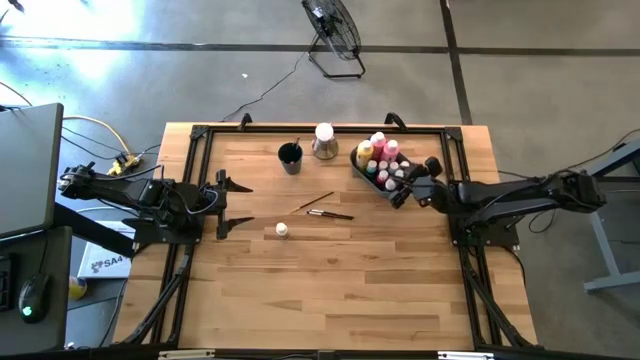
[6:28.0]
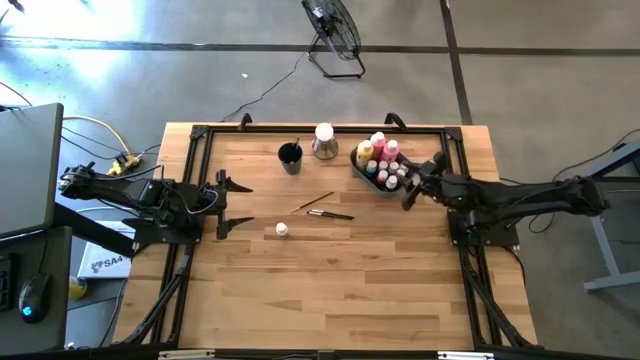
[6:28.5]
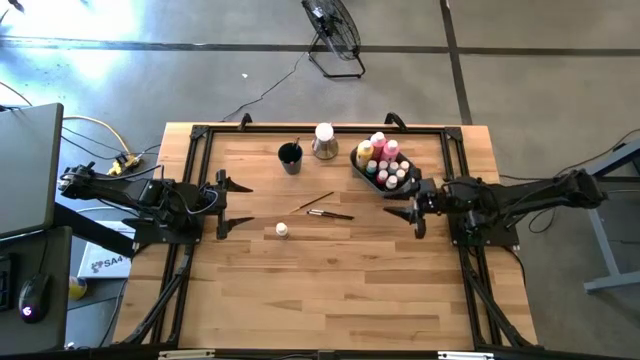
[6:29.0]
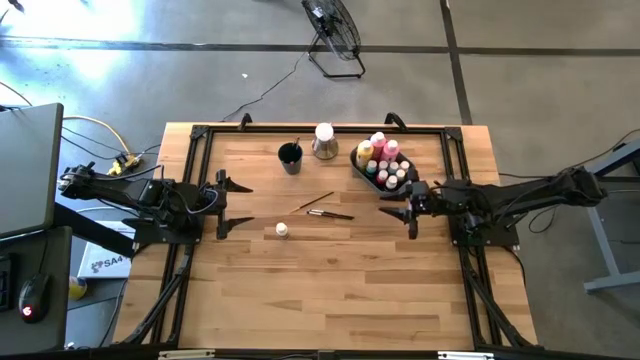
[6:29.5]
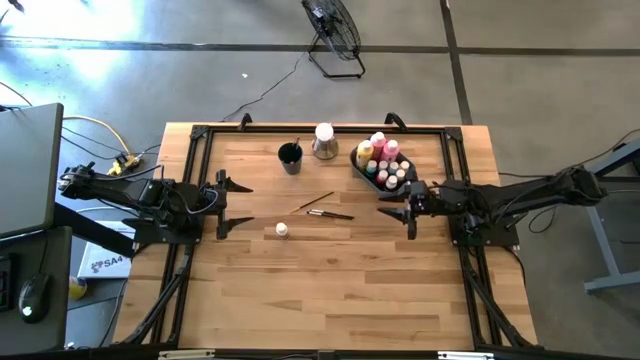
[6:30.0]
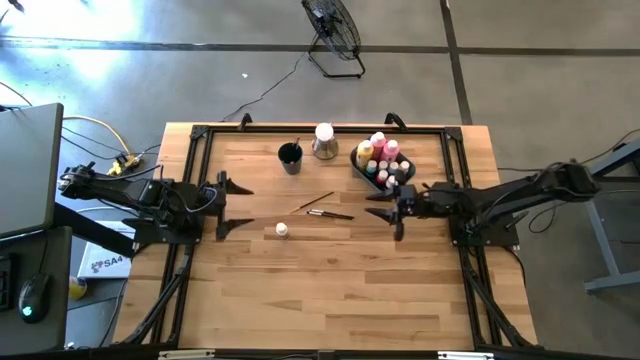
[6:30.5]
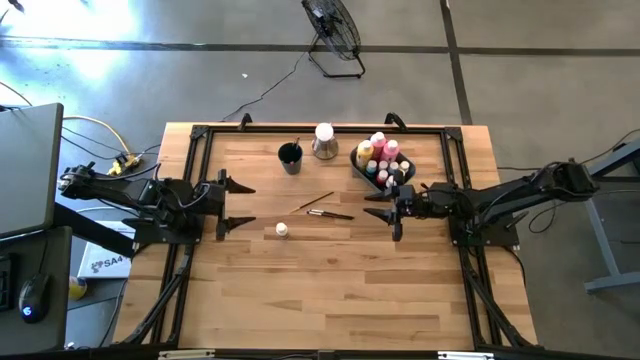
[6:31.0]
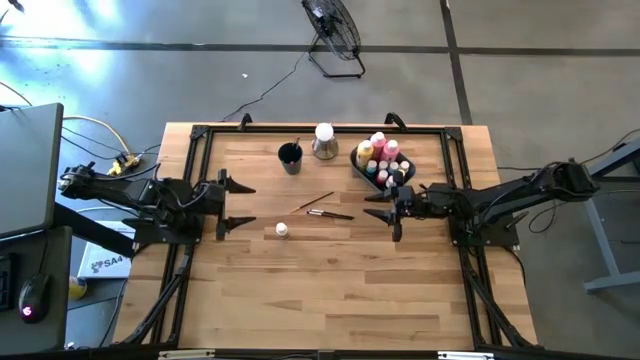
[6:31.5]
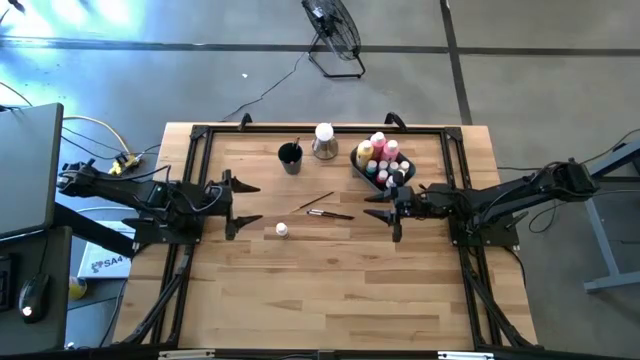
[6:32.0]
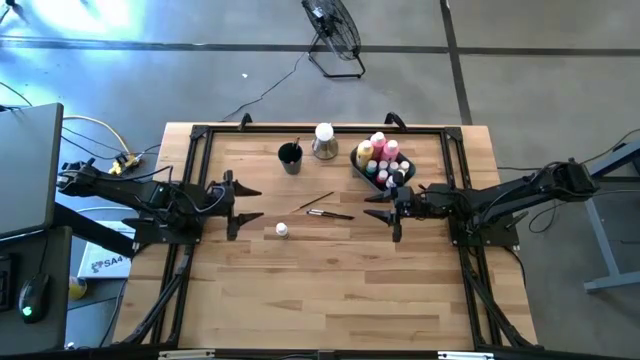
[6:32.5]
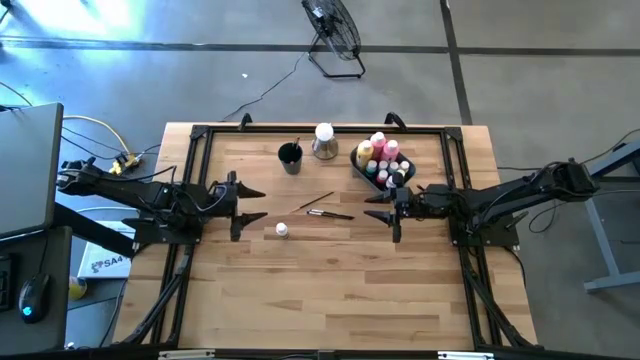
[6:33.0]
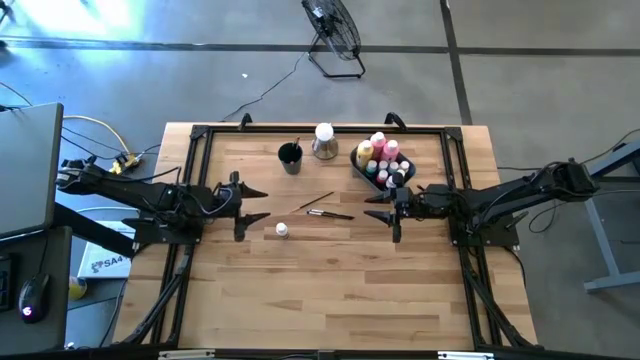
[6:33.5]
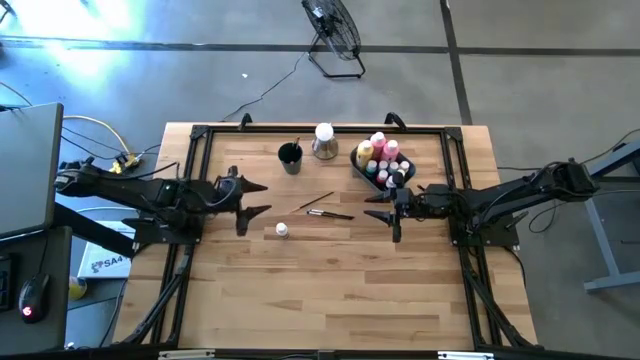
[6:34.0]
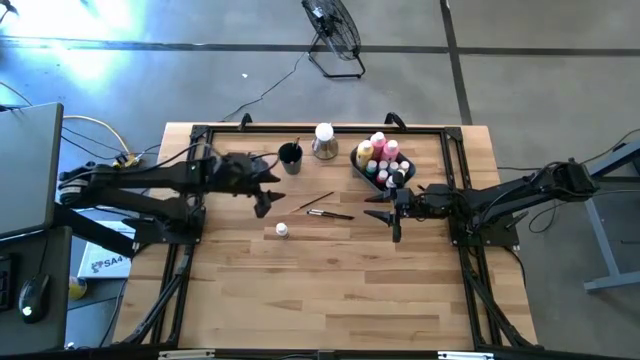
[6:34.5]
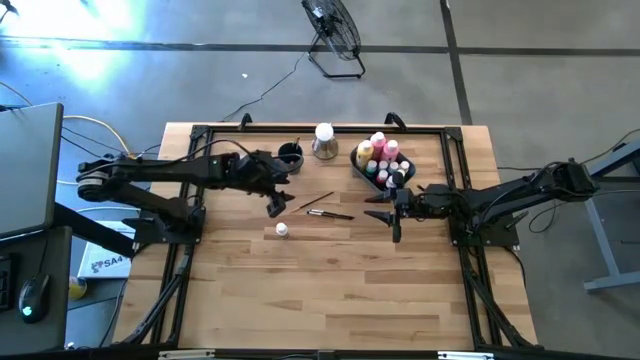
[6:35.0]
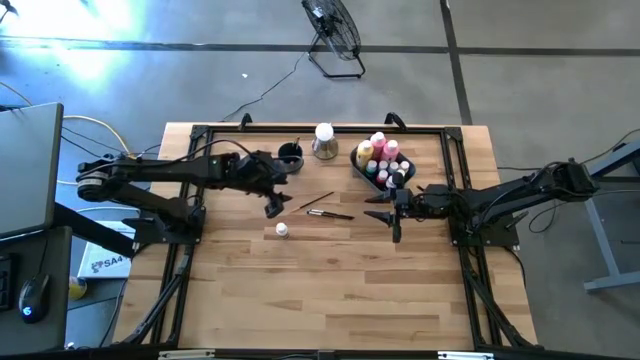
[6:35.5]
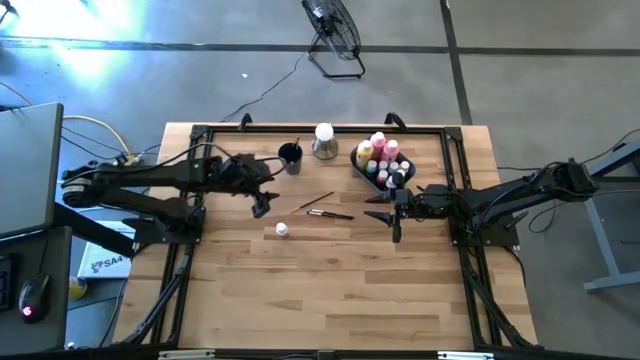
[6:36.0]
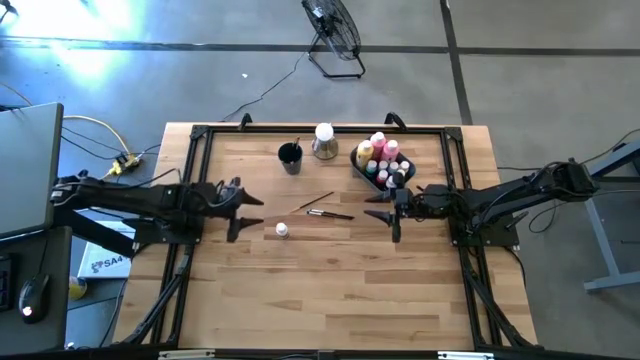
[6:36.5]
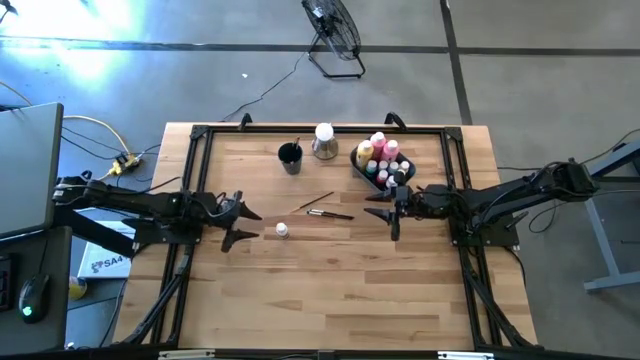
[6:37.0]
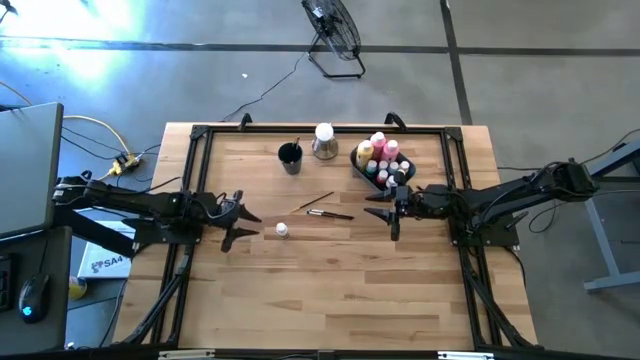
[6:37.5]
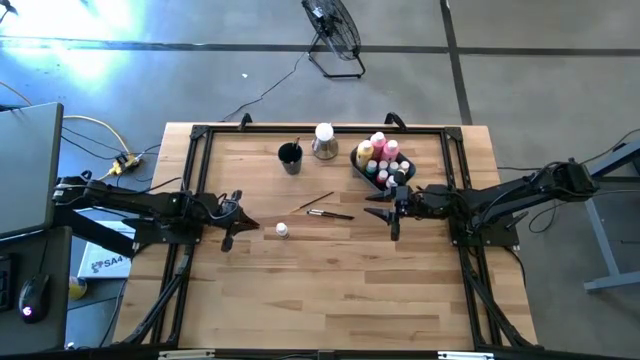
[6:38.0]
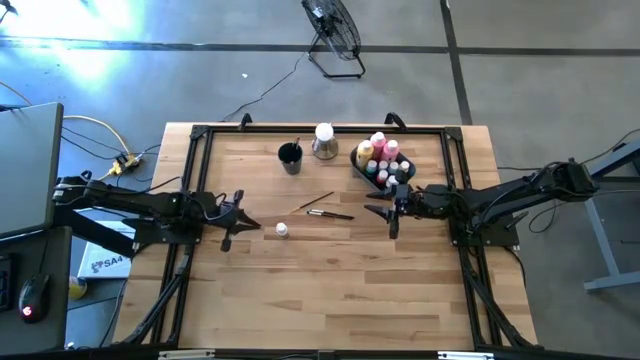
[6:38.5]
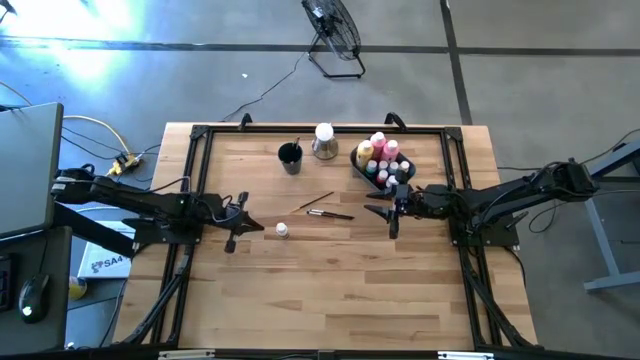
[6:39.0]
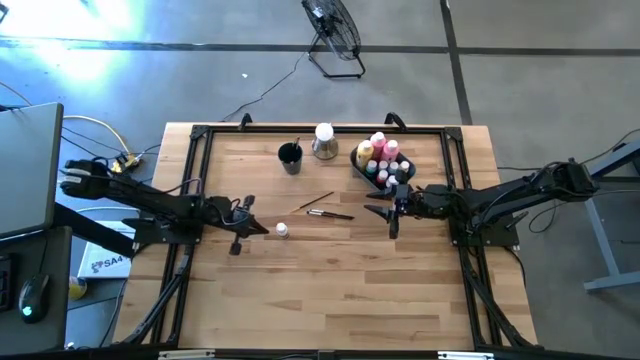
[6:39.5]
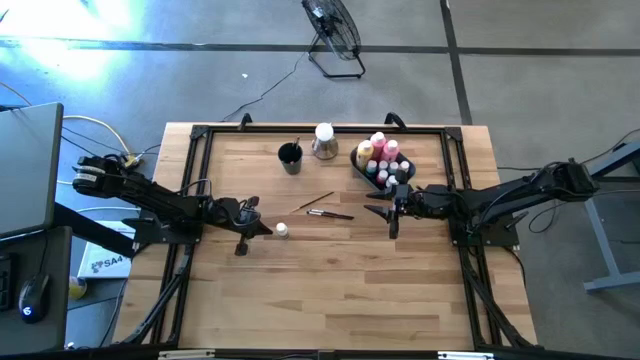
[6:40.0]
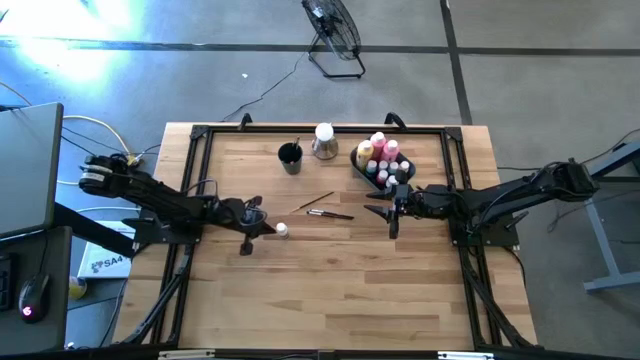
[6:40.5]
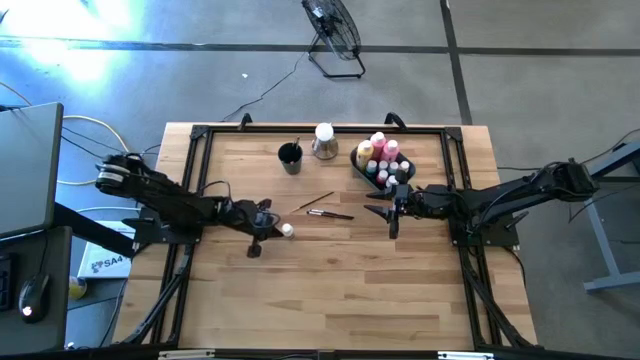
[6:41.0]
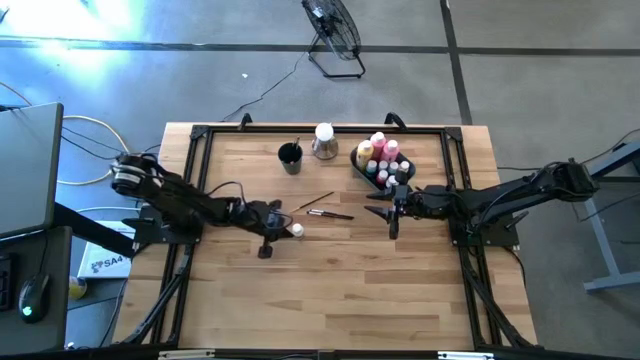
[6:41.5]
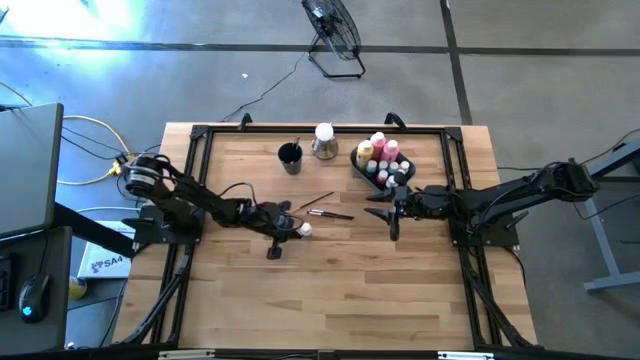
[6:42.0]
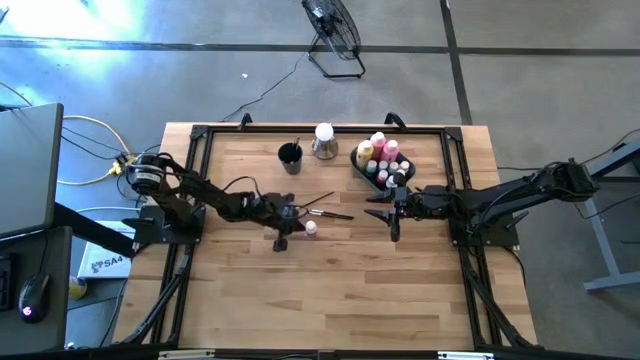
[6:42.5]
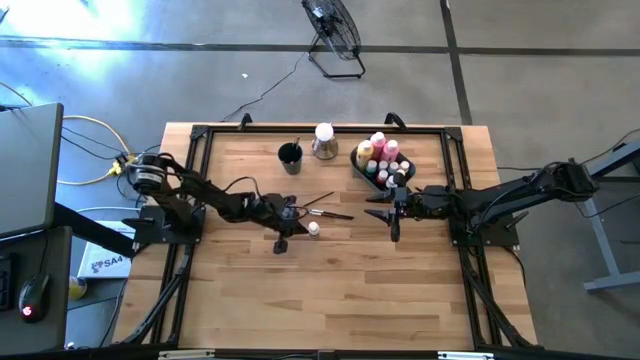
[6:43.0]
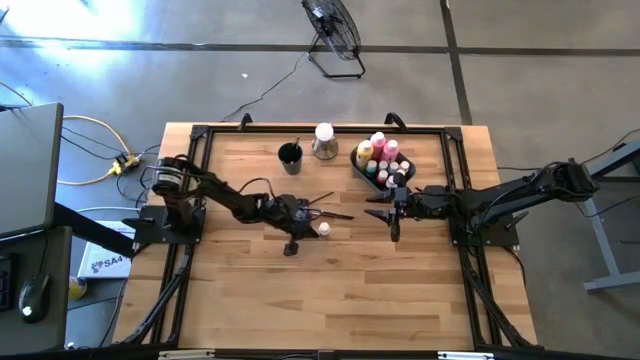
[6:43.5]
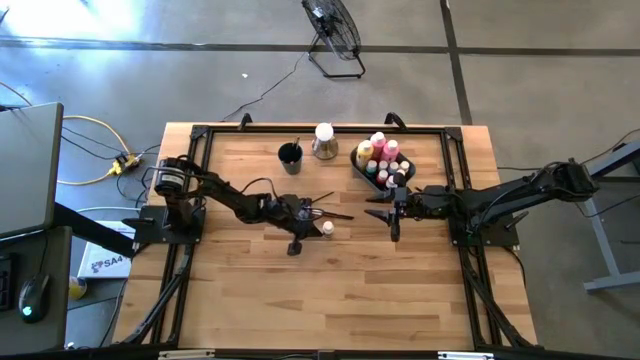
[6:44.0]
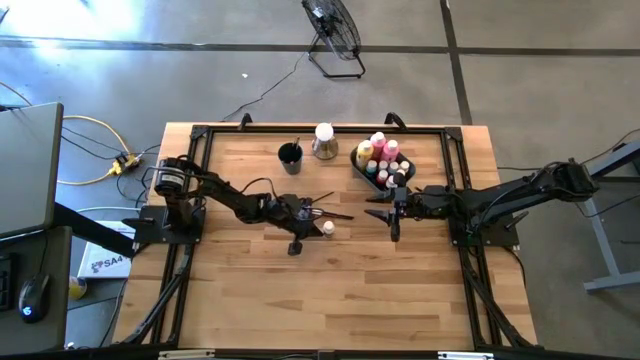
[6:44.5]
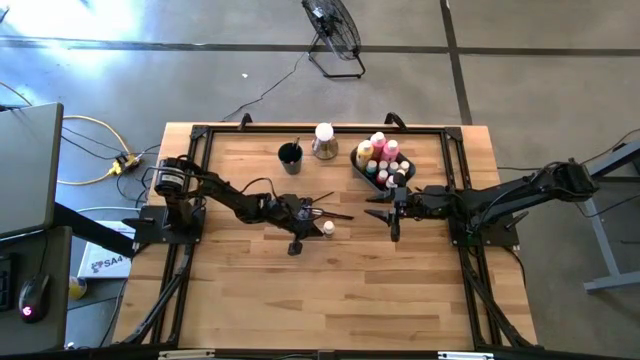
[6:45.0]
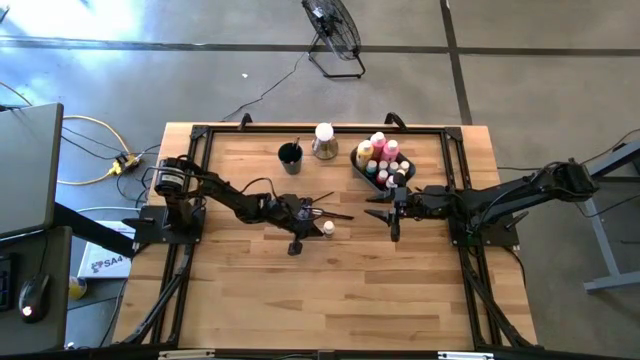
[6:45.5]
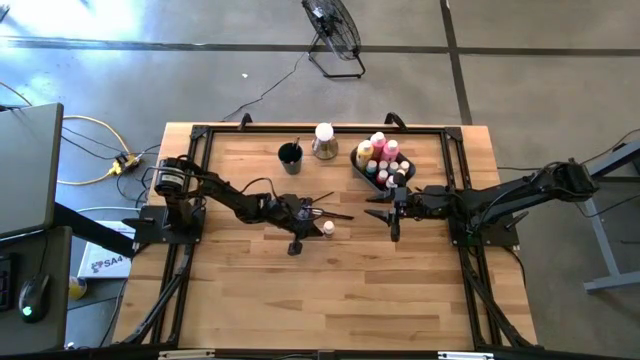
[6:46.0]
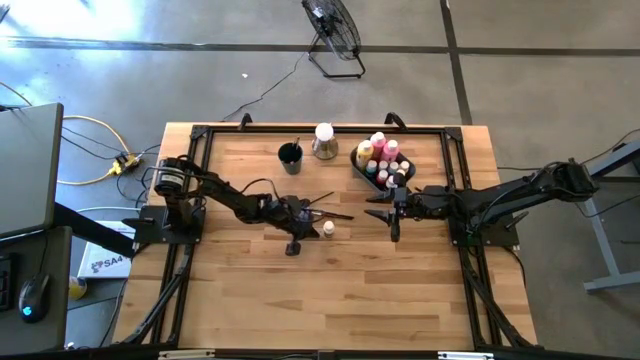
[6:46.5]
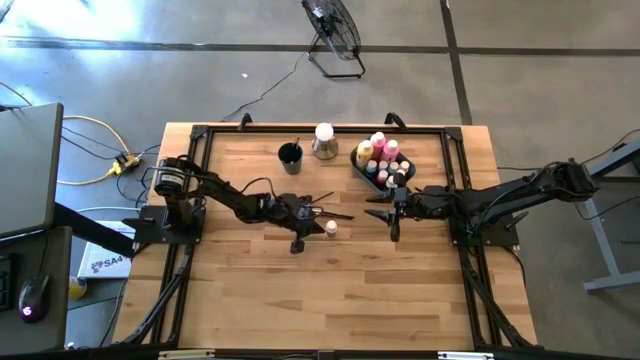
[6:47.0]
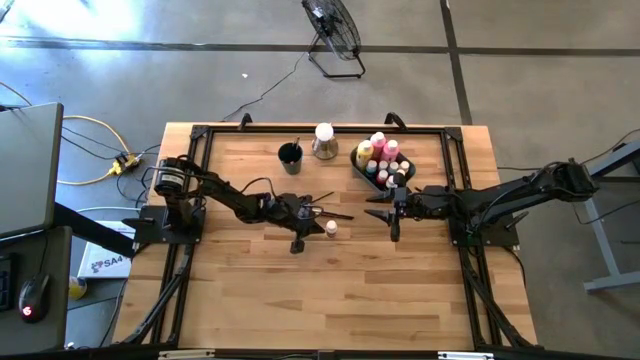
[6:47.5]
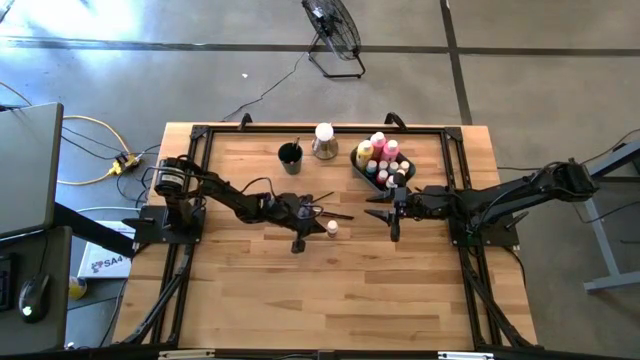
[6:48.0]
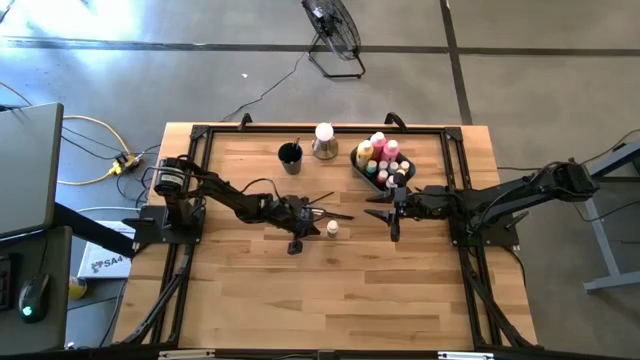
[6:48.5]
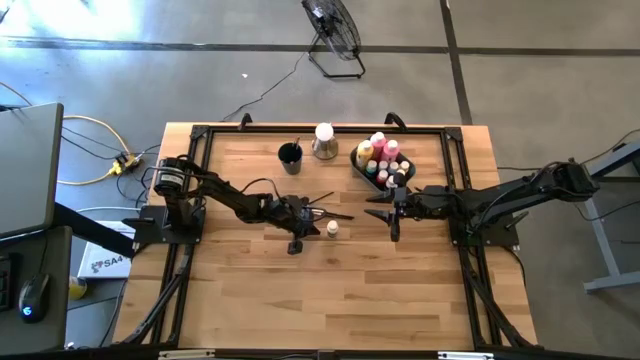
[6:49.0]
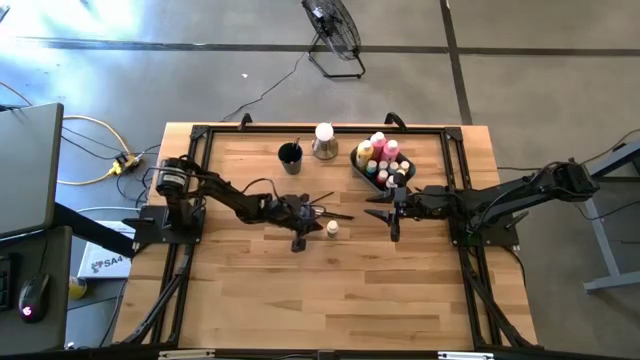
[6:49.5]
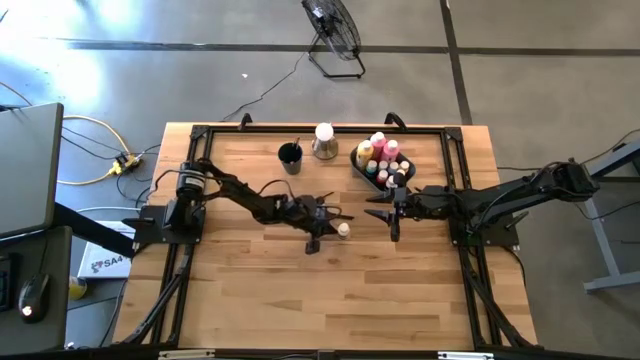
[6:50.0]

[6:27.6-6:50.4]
Task: Pick & Place Paint Supplies
Adjust the small white paint bottle
